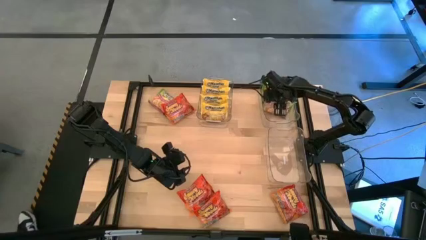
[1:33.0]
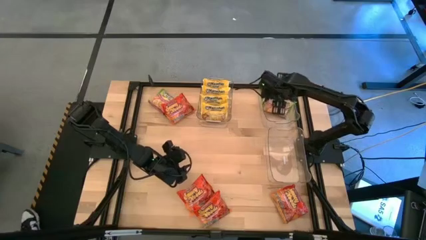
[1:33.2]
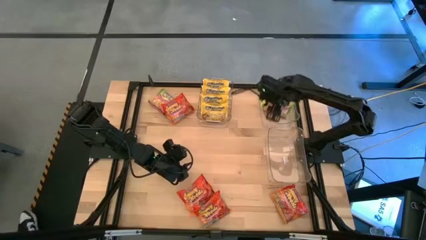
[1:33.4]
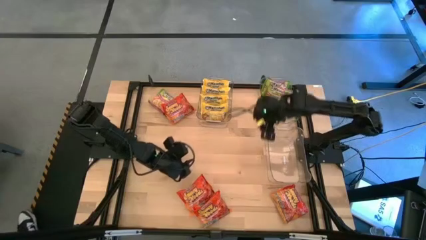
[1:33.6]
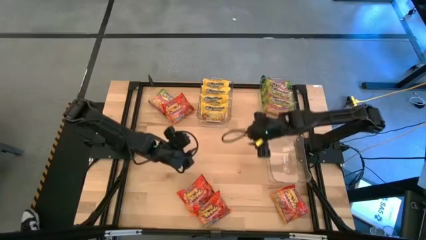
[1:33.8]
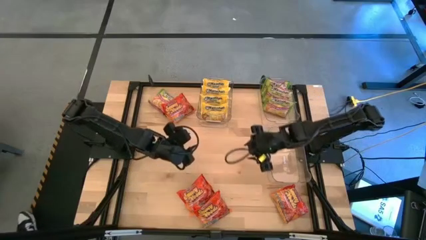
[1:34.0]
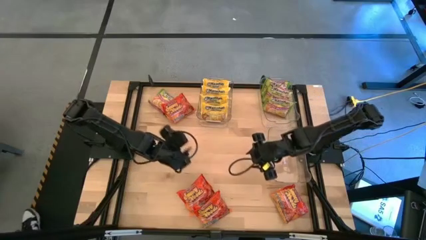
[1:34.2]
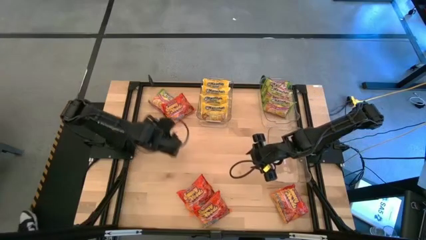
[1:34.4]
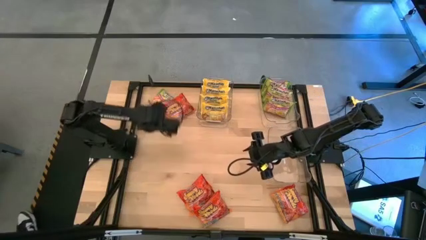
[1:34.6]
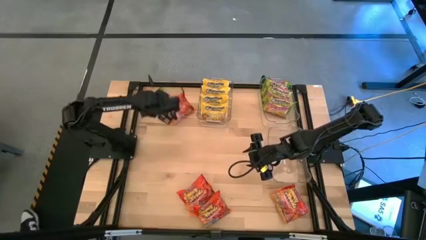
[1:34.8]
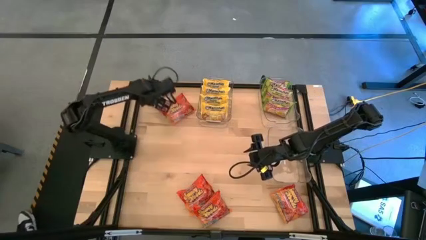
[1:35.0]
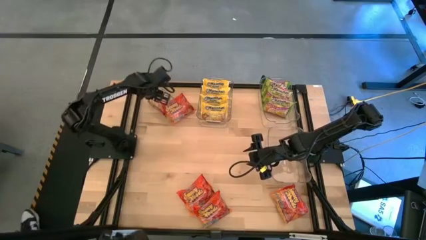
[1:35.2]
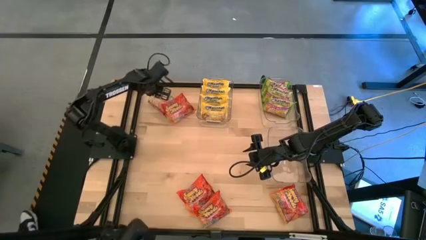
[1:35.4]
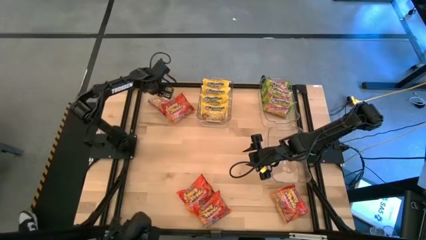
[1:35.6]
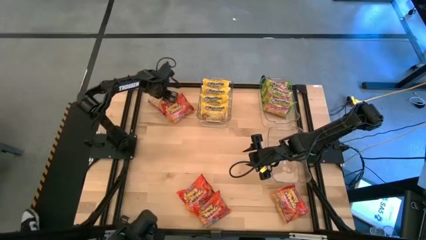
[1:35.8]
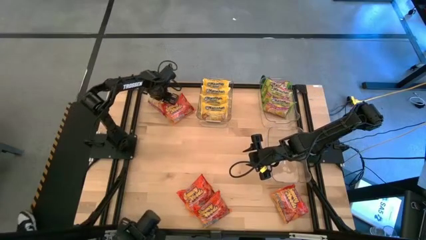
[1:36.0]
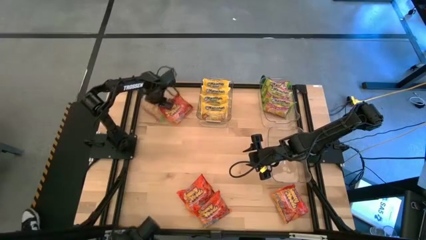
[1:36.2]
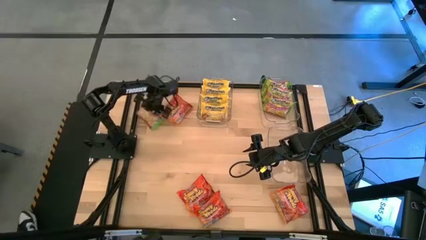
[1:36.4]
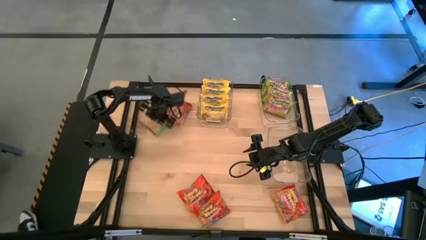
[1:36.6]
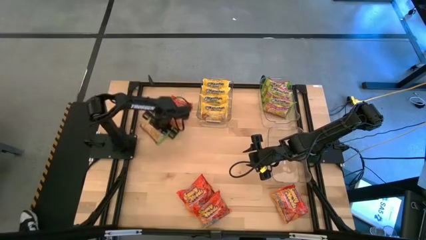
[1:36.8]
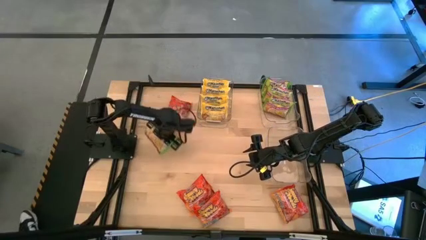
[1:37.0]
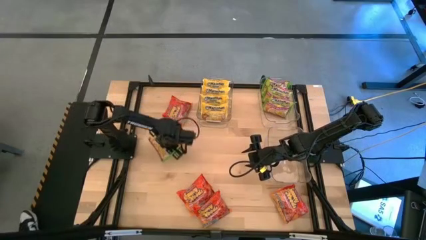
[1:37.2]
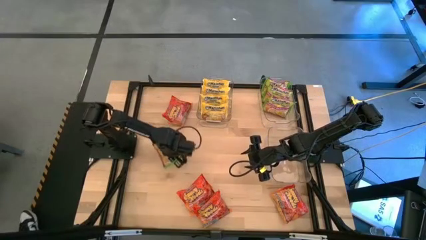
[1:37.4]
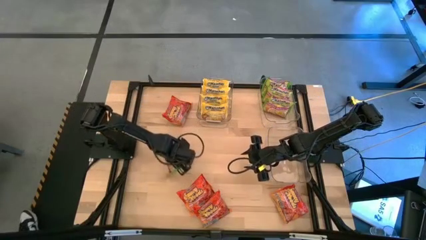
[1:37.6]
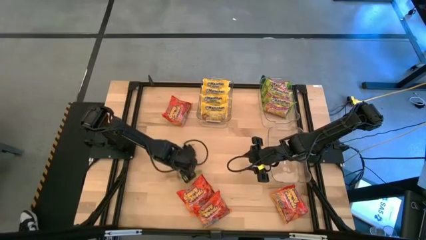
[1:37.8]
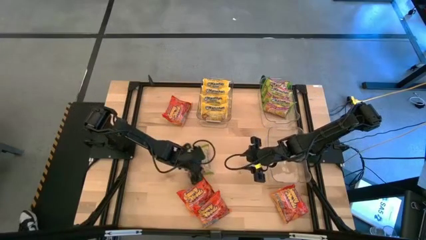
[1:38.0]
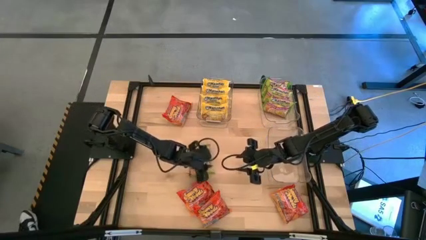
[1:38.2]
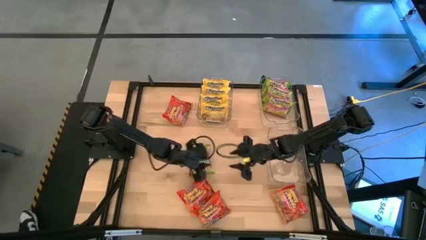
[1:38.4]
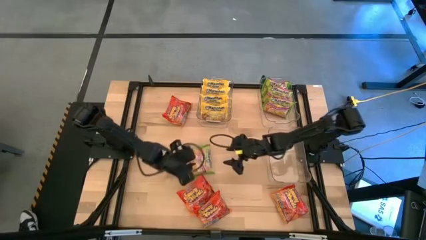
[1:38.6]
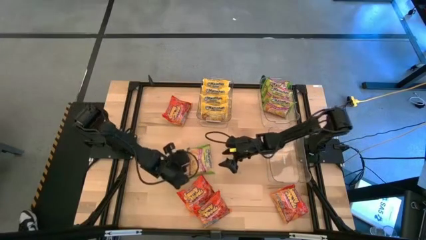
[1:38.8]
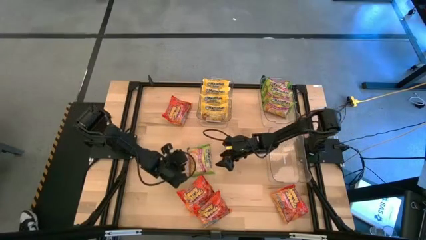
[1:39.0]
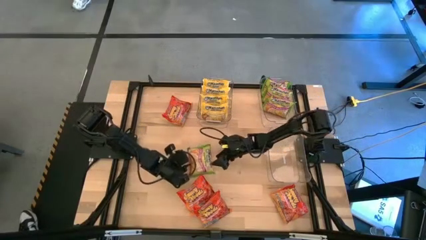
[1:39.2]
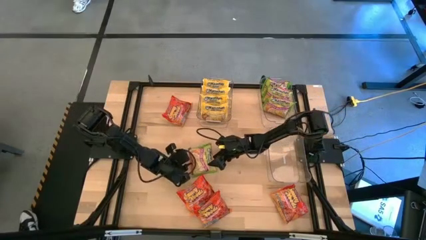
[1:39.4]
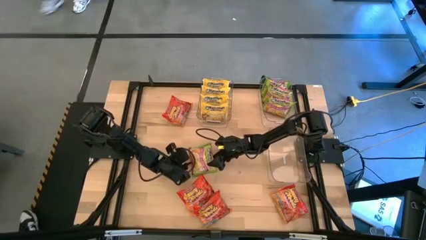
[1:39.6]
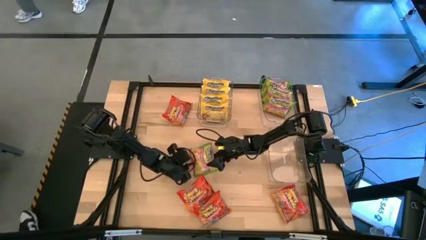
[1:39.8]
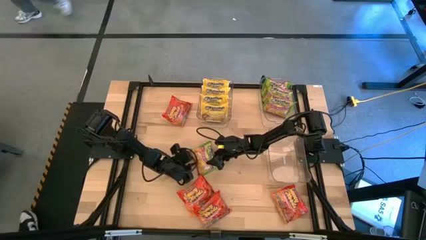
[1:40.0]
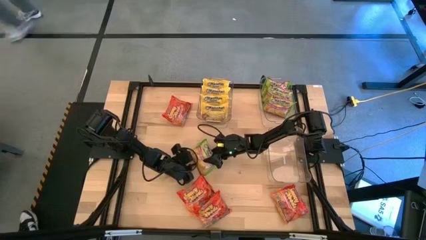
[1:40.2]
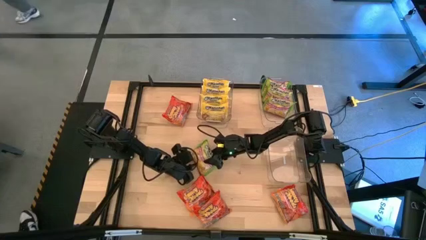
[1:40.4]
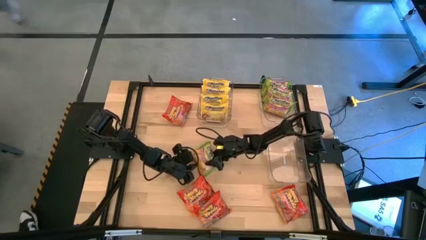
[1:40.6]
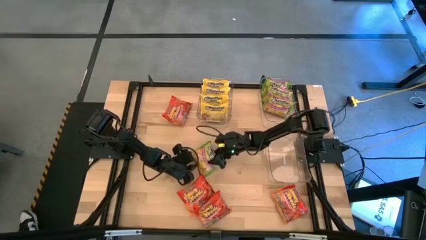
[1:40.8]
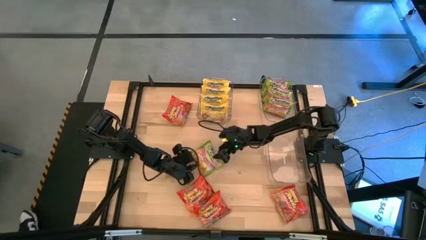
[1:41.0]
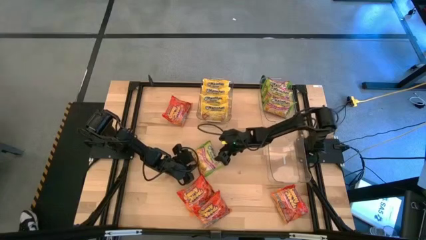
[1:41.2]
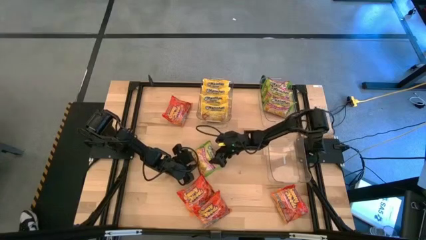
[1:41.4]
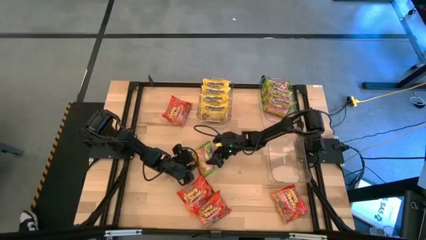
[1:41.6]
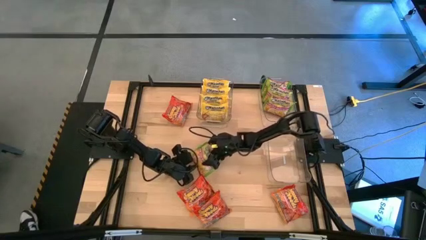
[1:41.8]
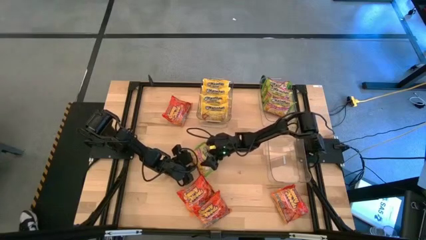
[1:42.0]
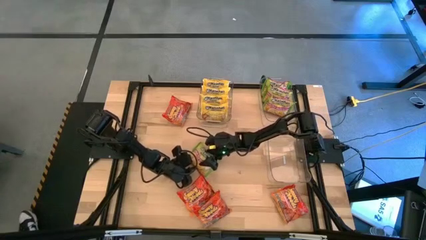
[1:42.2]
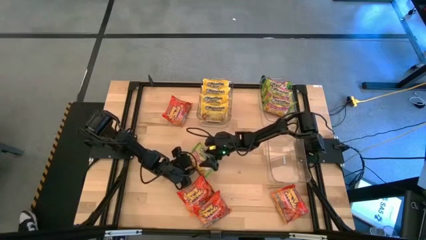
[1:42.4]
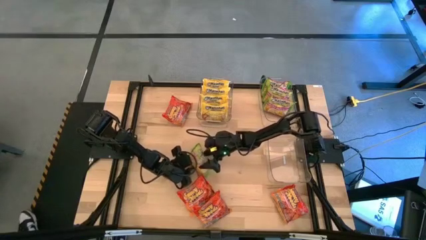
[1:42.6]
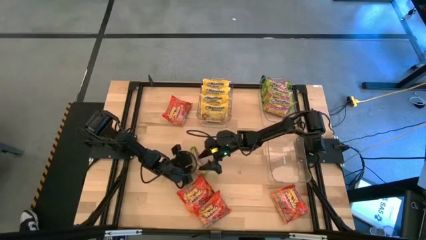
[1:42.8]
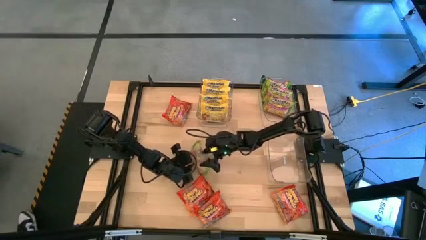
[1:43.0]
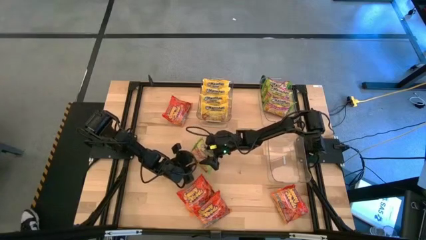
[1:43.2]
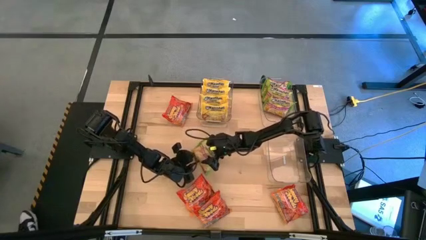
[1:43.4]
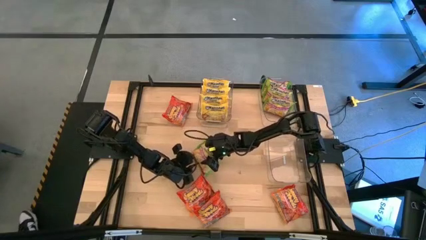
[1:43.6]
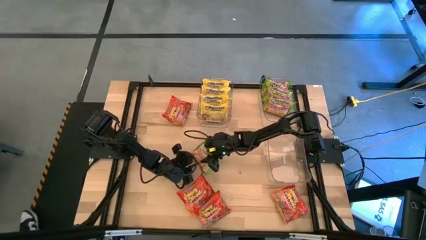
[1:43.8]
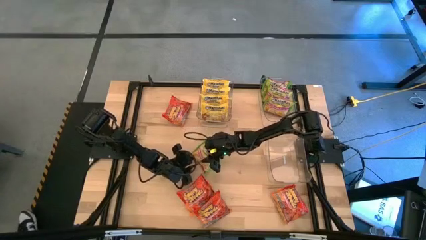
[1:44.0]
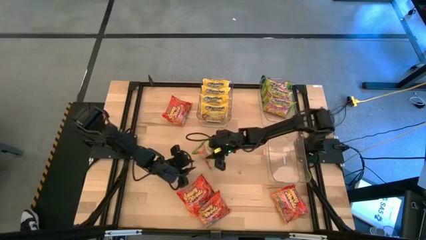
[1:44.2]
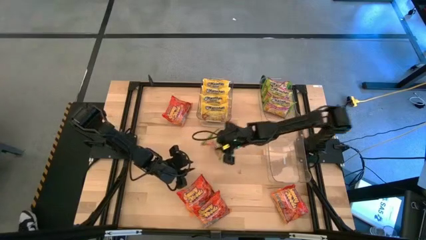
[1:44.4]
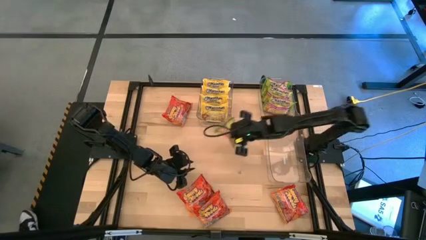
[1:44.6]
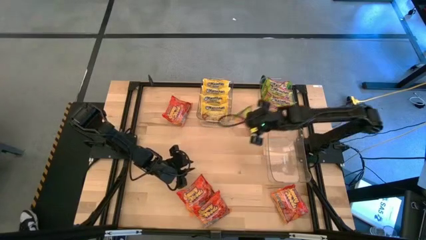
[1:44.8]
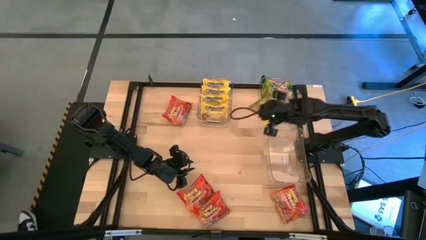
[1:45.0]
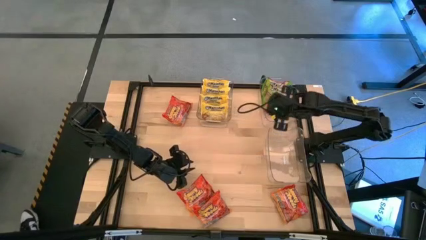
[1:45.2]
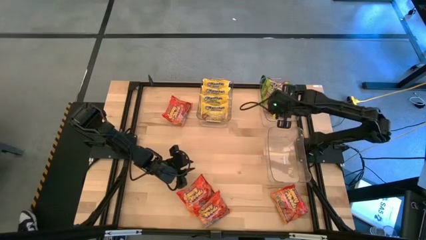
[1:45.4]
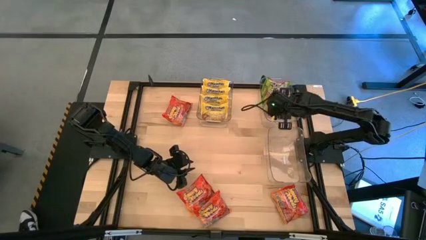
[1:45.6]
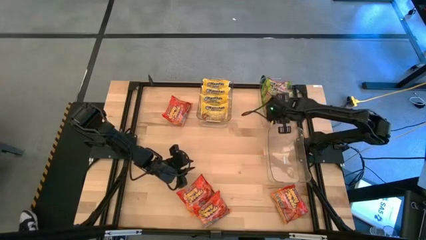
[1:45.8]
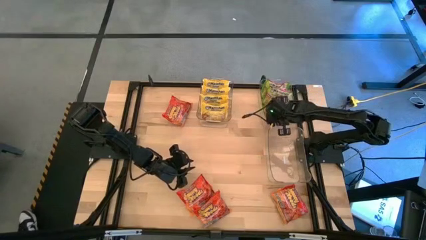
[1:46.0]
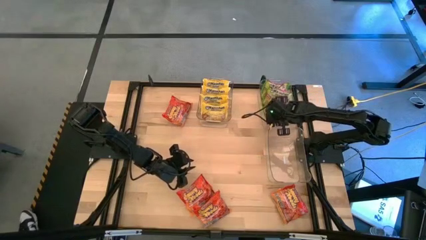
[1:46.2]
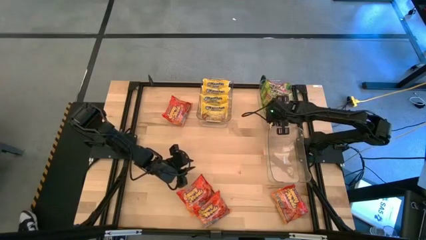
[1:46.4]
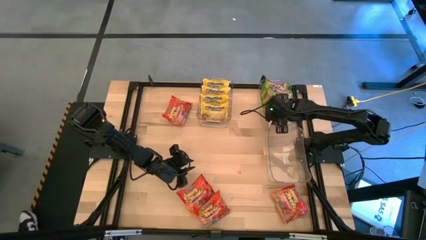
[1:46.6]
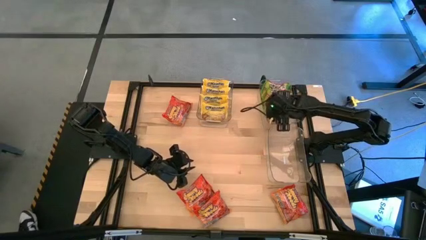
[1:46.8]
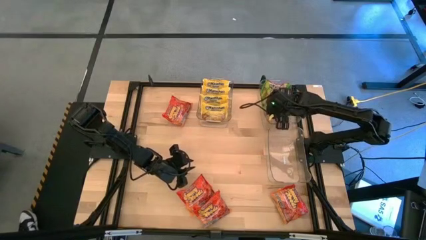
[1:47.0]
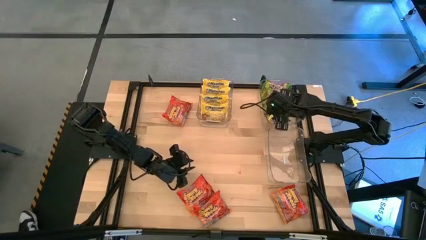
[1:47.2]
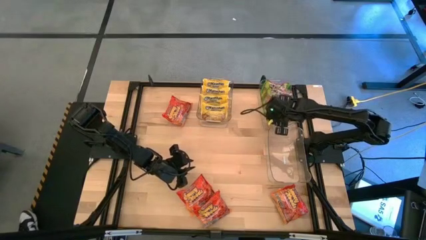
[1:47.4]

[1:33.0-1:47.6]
Task: Sort Maruchan noodles
Put the green noodle pack into the top right transparent bin
